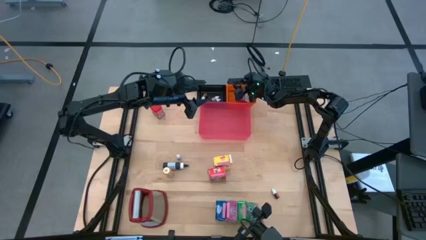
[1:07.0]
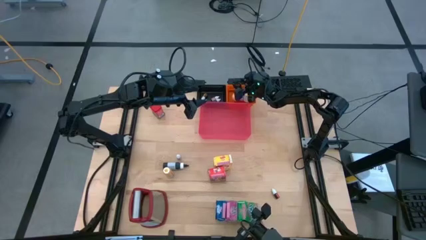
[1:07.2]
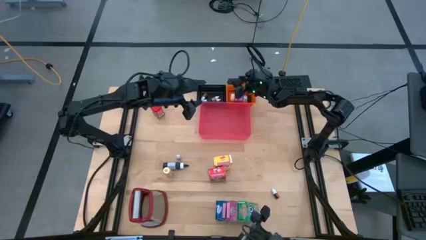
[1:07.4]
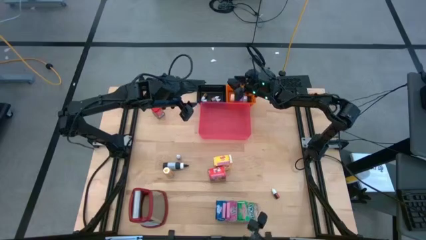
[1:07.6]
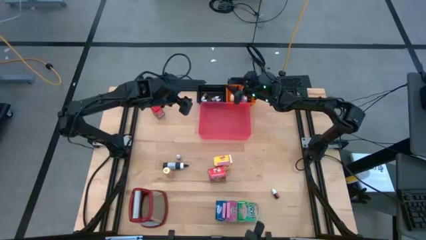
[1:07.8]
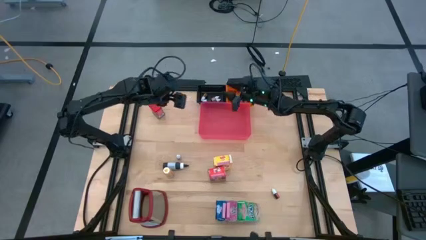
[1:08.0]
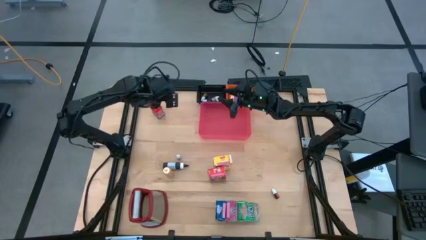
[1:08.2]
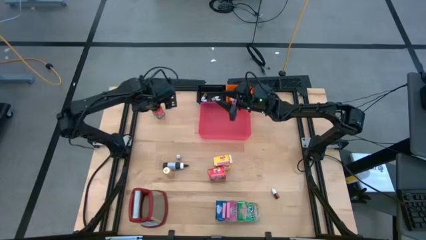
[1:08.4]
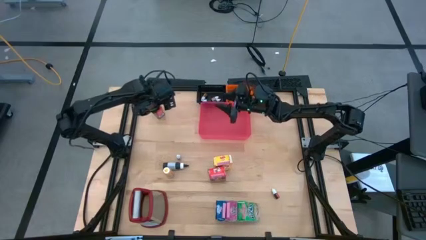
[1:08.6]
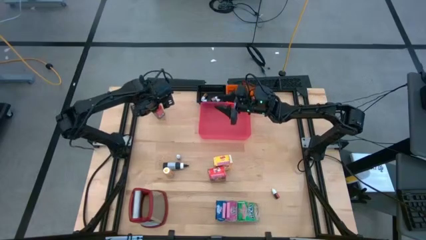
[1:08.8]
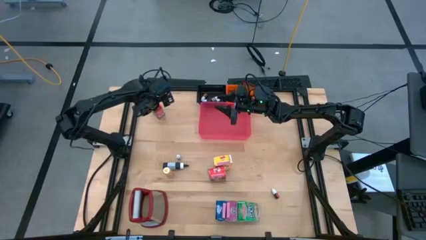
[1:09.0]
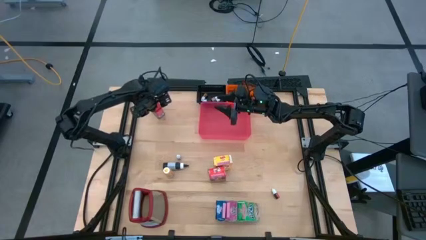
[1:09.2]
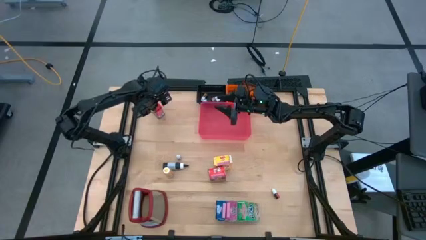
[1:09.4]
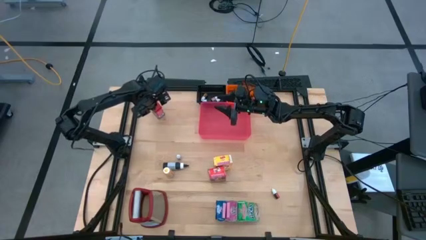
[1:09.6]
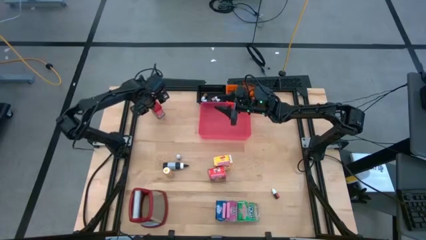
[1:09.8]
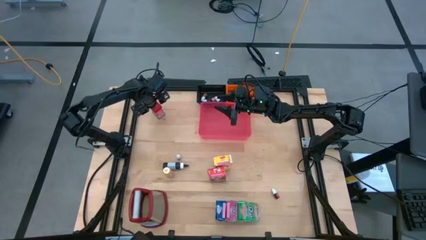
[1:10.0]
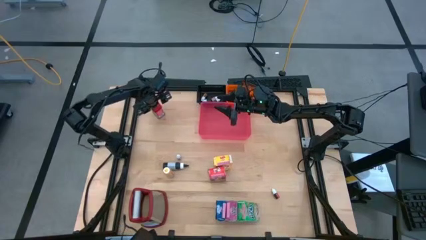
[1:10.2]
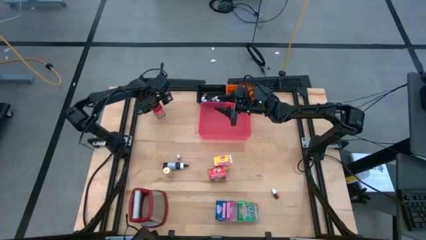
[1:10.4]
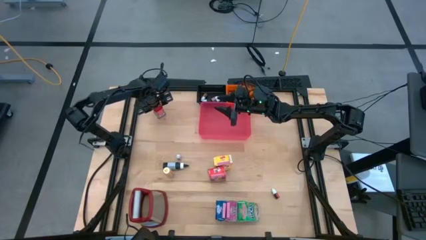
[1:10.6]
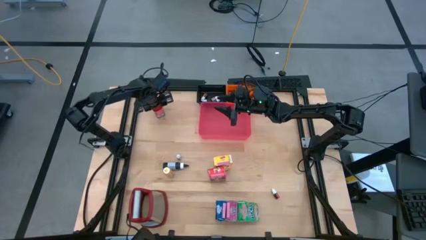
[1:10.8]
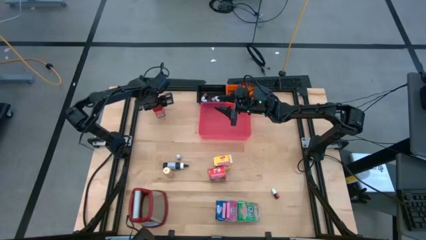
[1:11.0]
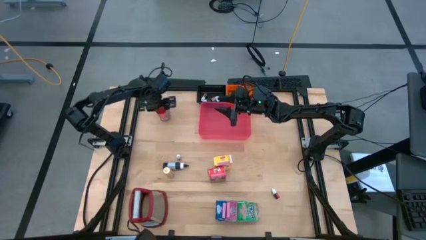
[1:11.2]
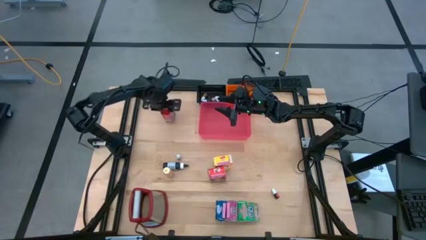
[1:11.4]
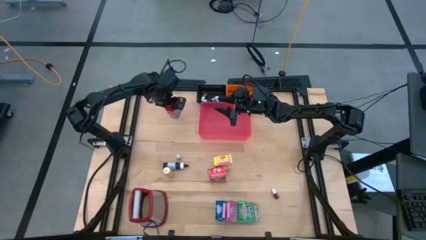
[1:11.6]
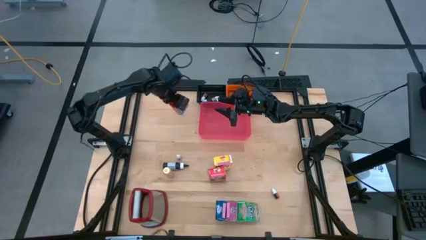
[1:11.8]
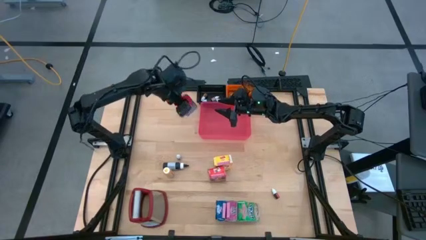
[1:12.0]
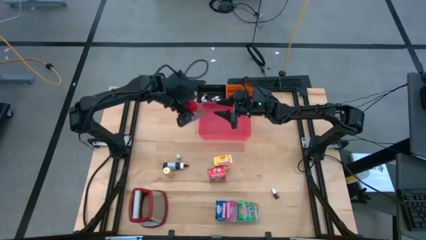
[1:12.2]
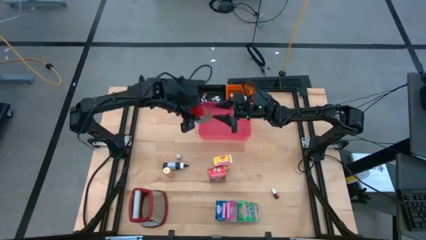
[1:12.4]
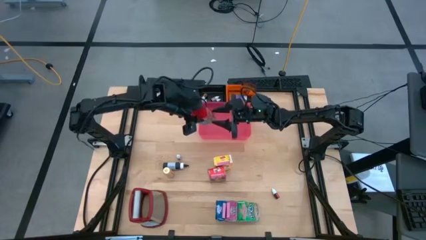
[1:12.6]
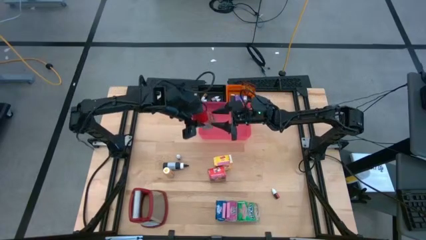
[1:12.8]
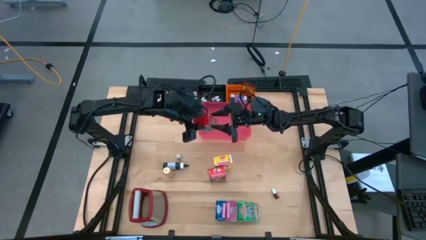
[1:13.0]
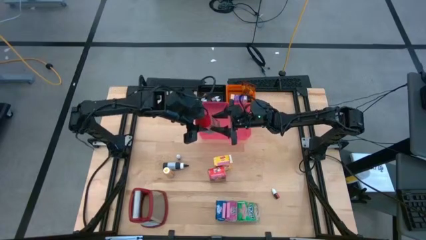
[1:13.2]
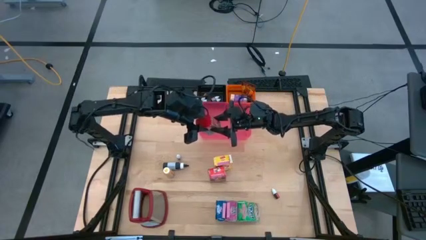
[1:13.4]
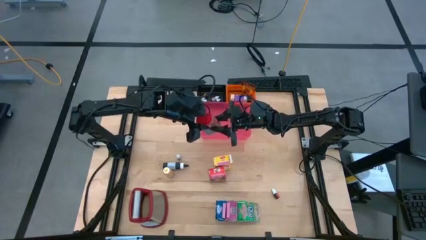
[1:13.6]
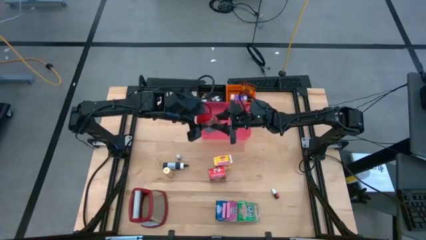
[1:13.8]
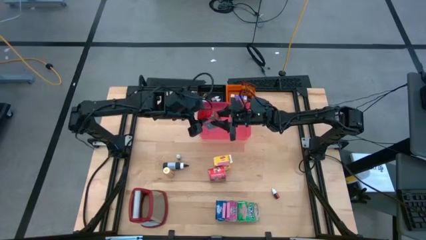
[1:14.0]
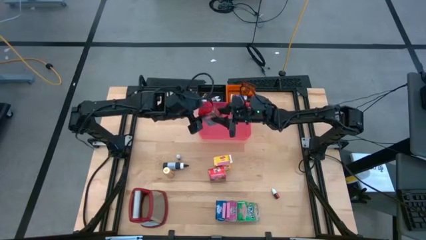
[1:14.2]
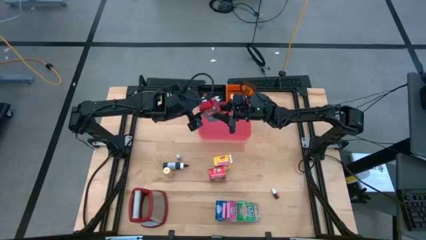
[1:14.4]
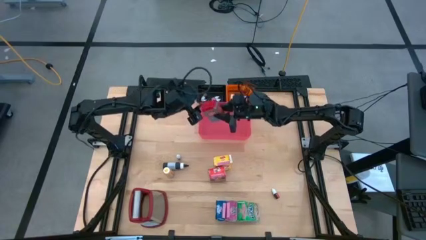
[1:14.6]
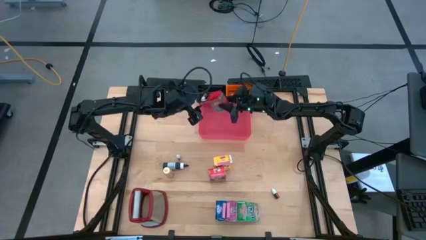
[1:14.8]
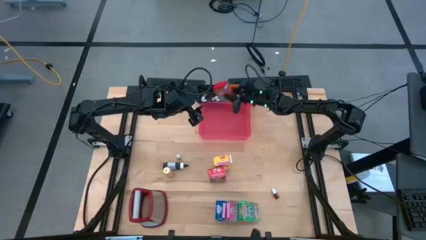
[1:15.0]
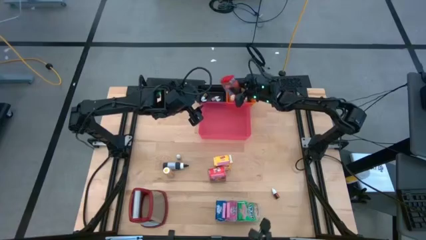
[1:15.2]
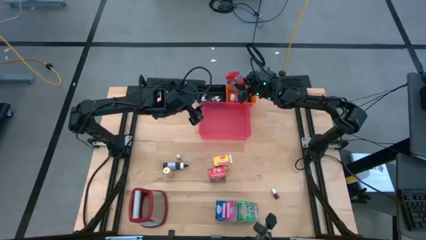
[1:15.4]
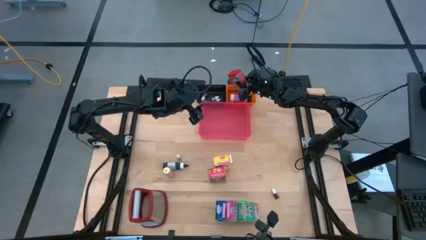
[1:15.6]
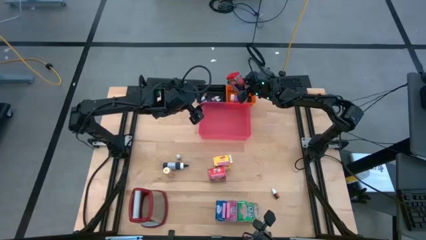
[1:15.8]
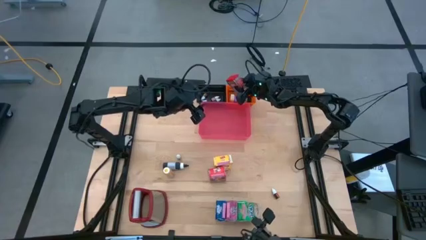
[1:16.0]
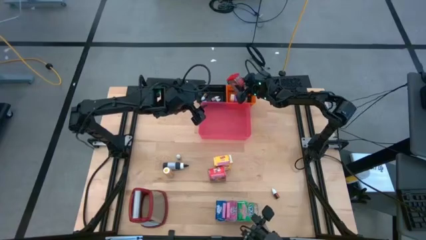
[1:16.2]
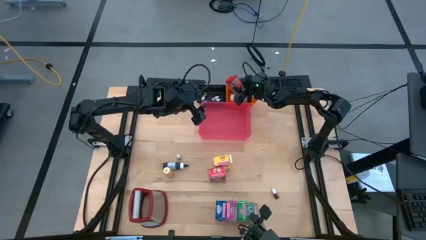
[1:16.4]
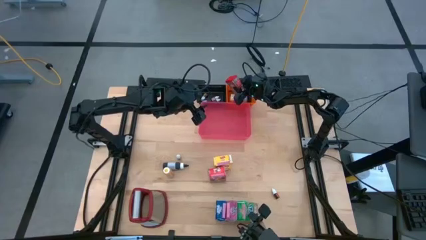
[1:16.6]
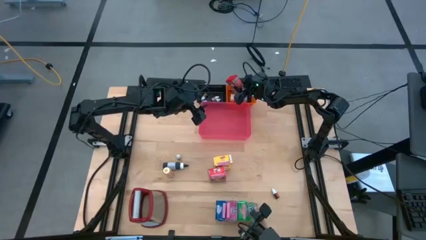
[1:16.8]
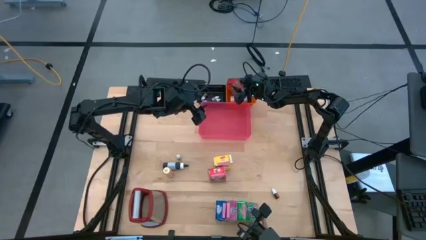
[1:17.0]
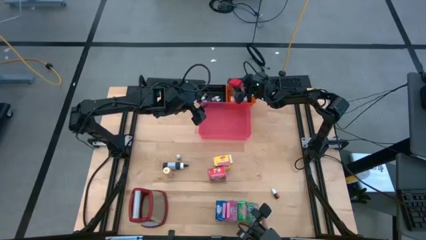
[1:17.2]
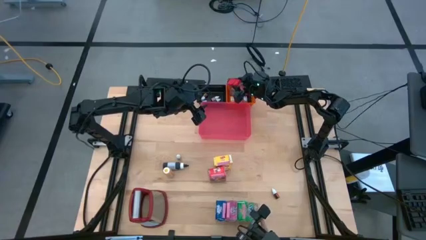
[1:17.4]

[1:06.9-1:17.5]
Task: Pick & Place Kitchen Items
Put the spice can into the orange bin

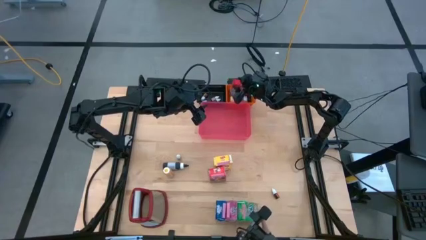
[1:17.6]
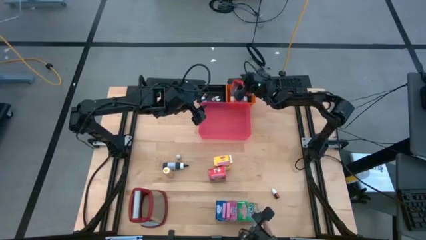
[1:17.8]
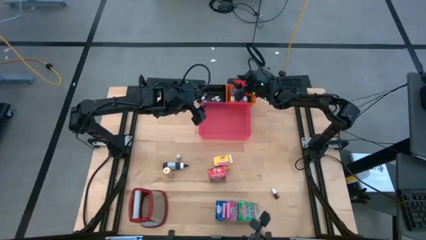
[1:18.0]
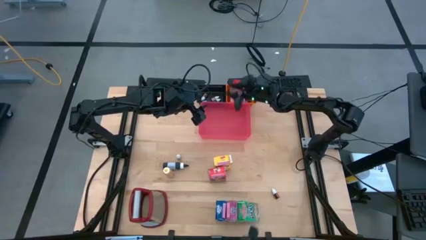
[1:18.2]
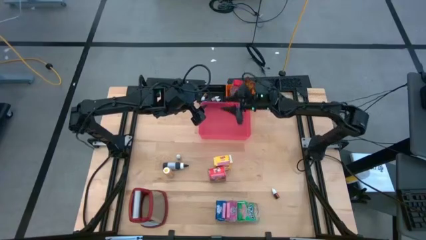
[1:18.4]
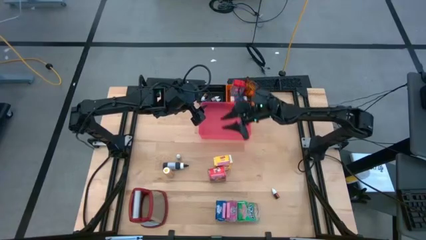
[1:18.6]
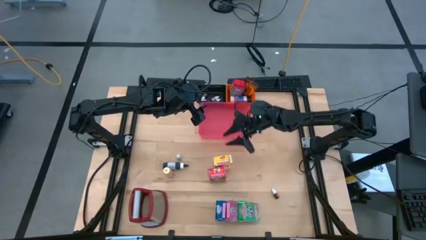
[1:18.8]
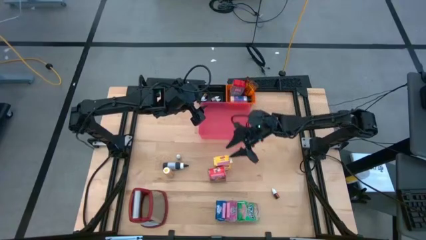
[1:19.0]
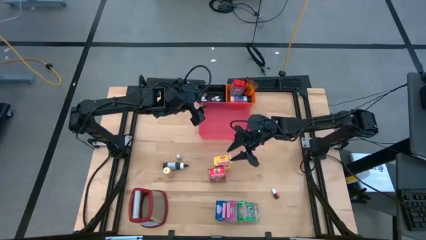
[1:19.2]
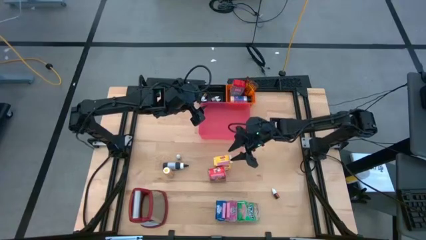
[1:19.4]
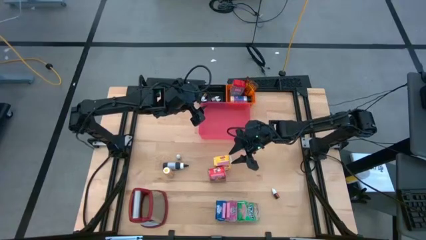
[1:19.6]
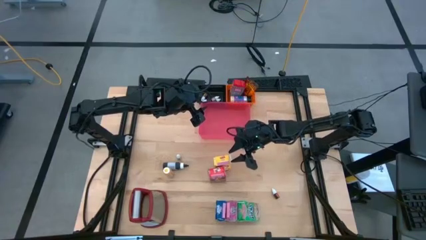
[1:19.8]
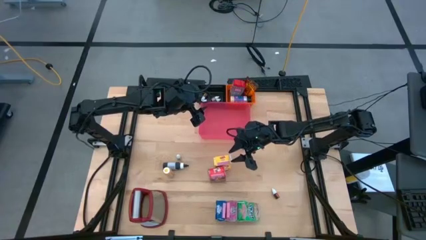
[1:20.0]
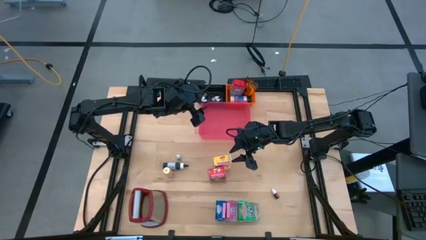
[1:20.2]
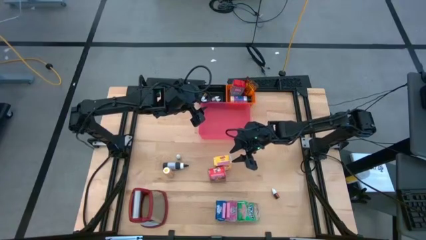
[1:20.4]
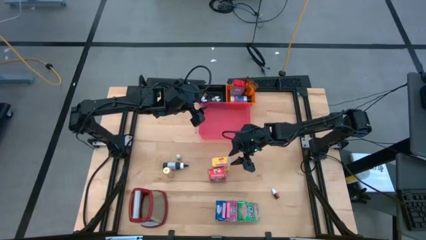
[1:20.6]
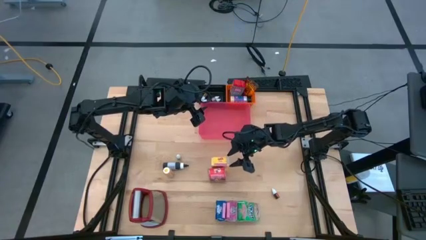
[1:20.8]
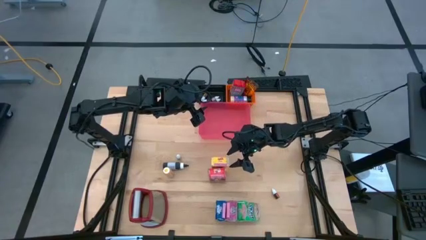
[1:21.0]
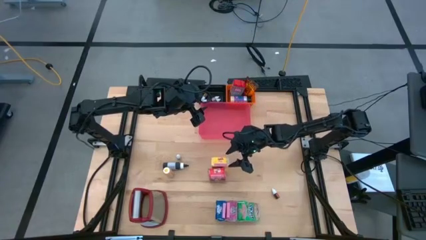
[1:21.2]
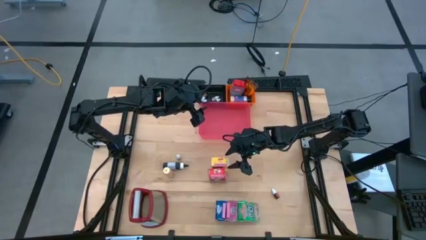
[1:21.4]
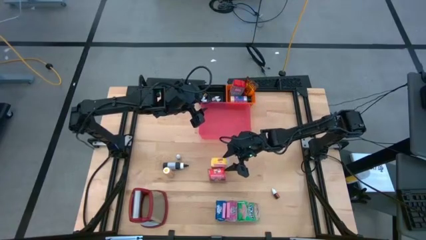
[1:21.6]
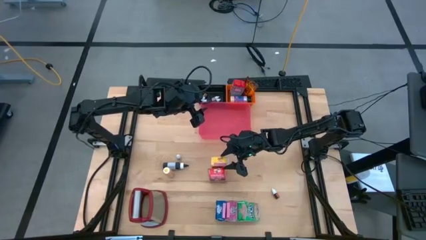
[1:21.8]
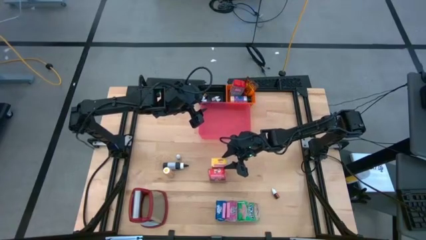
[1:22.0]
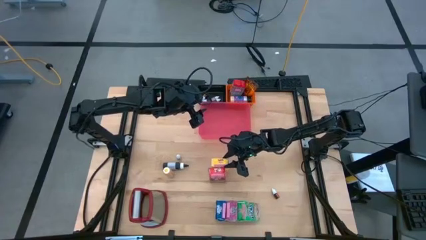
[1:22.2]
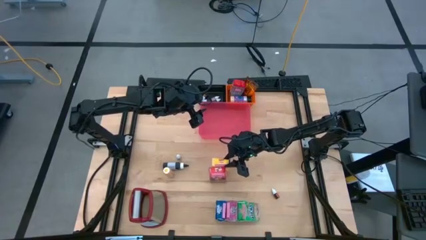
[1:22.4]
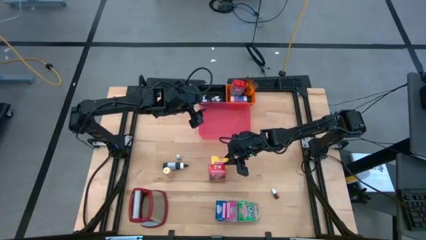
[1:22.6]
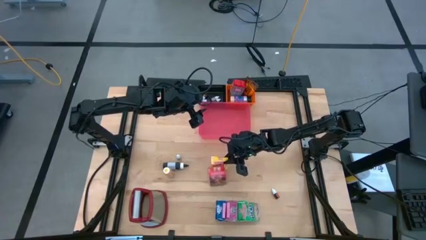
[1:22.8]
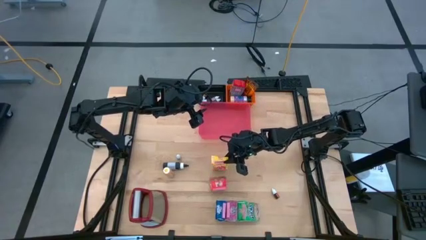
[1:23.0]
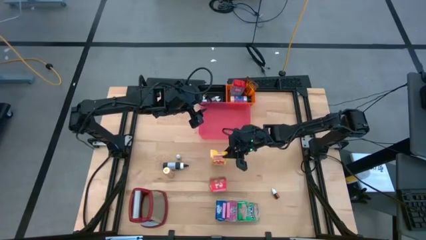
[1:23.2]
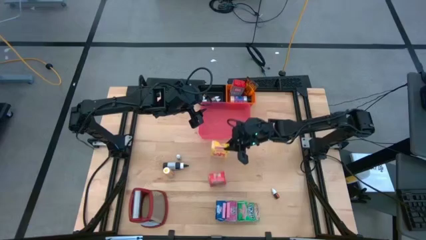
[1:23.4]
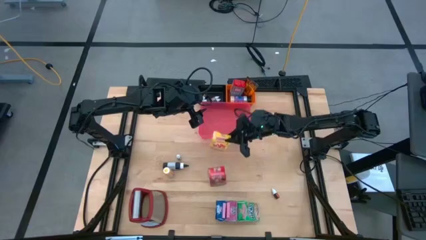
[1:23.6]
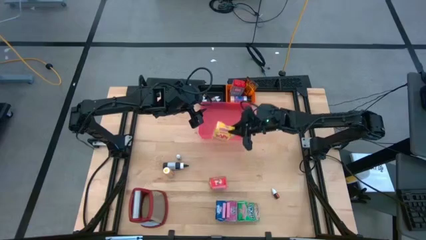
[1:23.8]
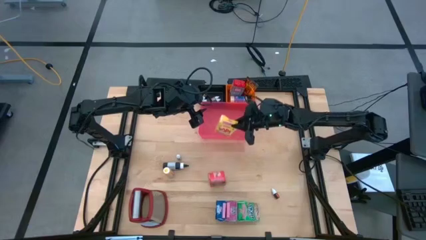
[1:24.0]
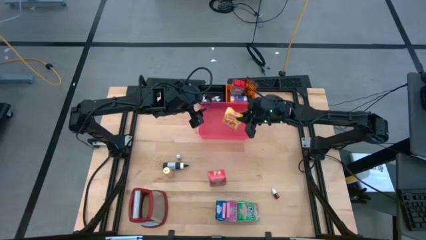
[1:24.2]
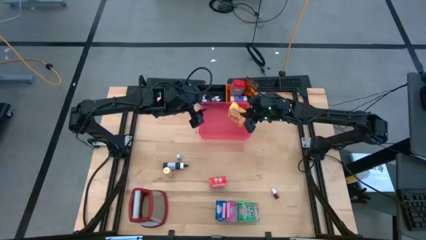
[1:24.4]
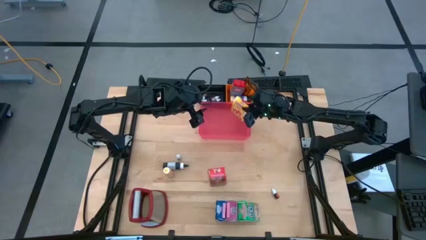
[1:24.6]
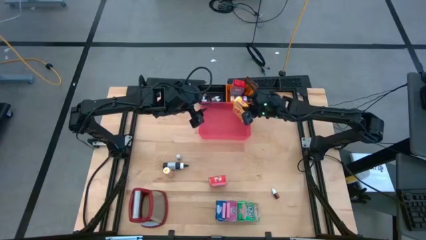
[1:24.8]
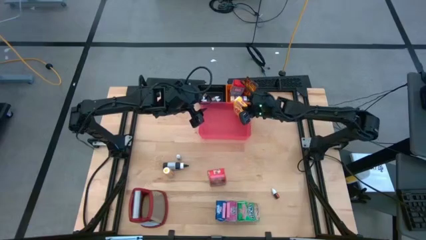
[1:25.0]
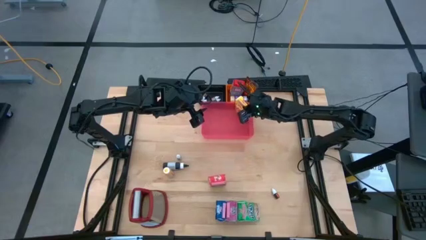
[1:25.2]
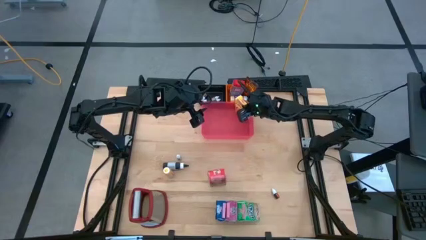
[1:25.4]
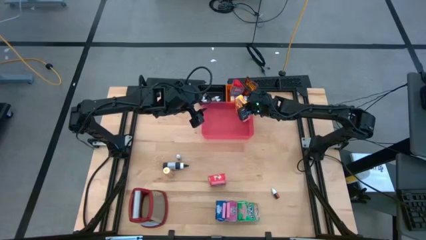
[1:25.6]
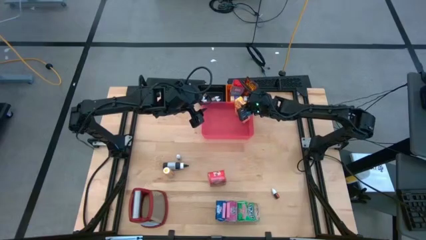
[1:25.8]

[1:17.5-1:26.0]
Put the yellow cereal box into the pink bin
